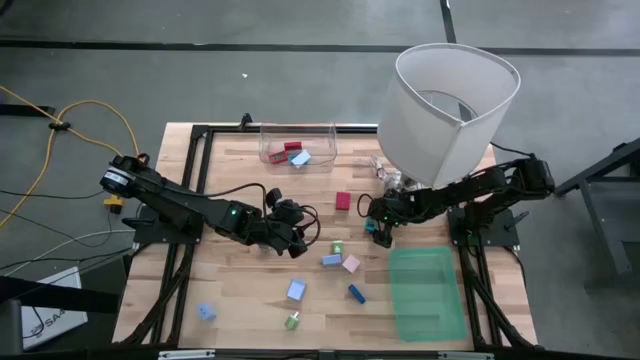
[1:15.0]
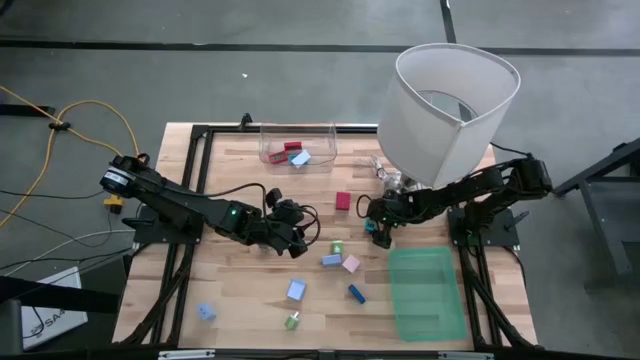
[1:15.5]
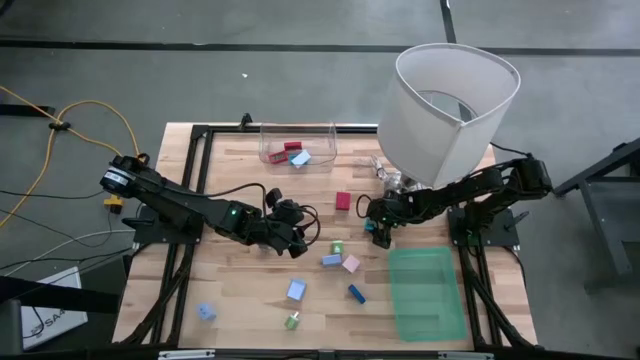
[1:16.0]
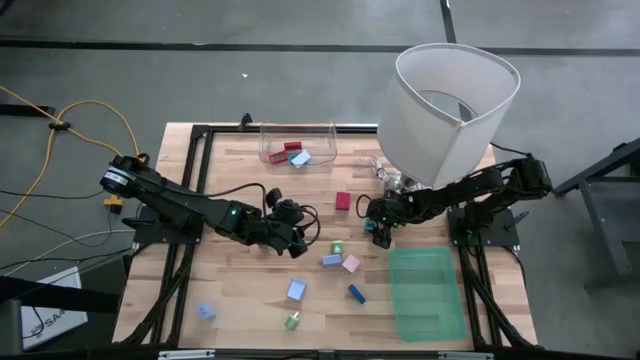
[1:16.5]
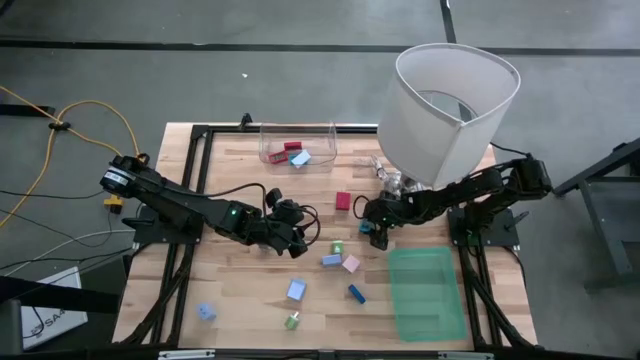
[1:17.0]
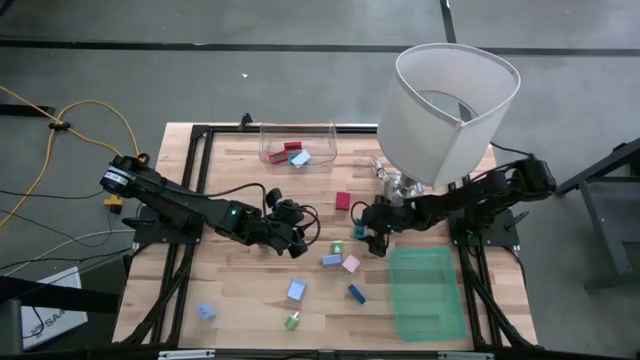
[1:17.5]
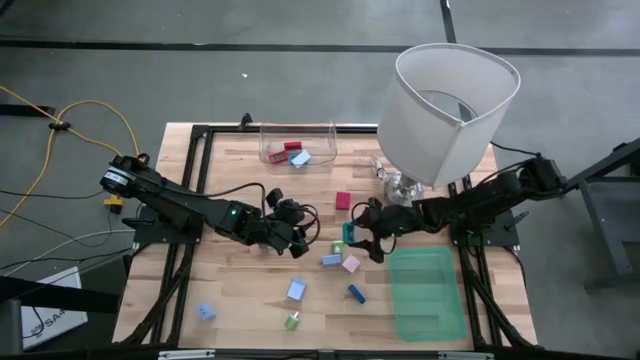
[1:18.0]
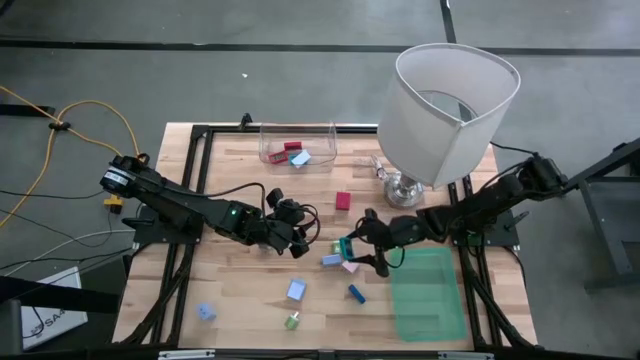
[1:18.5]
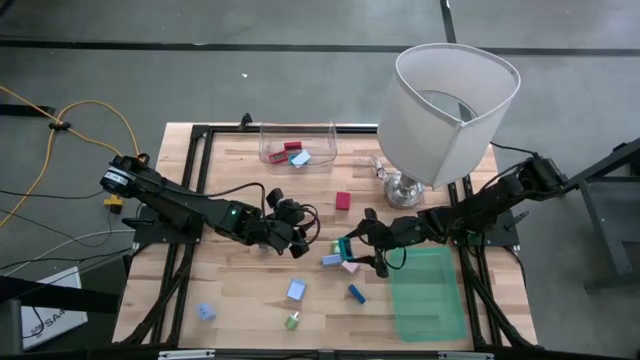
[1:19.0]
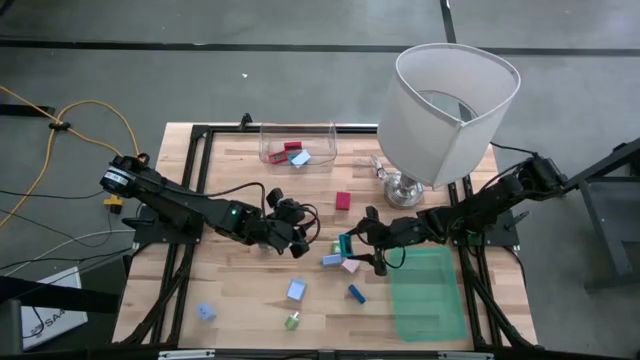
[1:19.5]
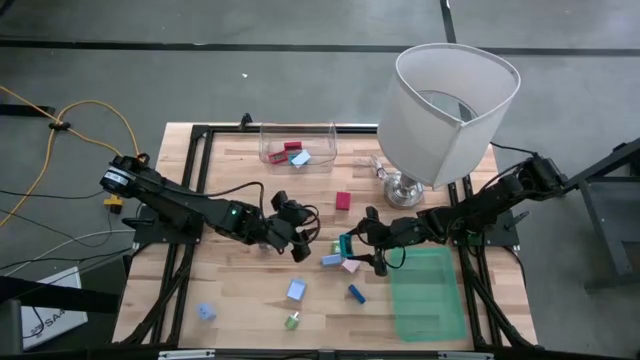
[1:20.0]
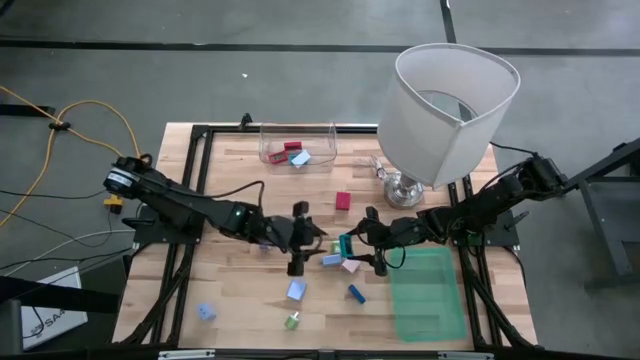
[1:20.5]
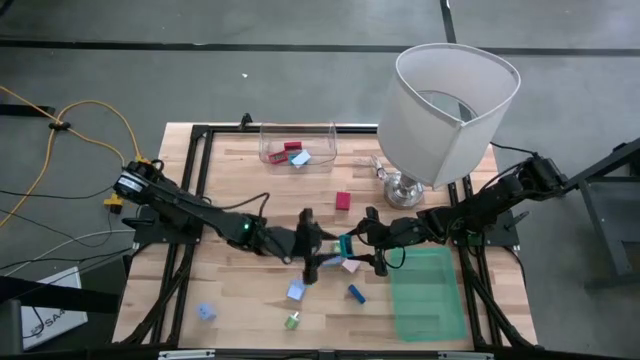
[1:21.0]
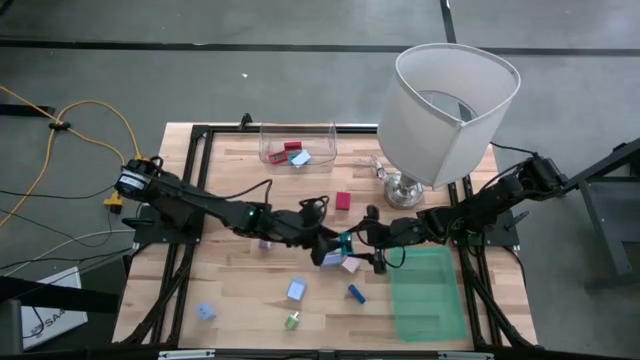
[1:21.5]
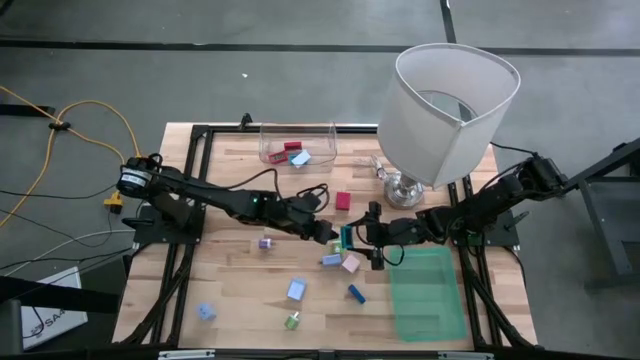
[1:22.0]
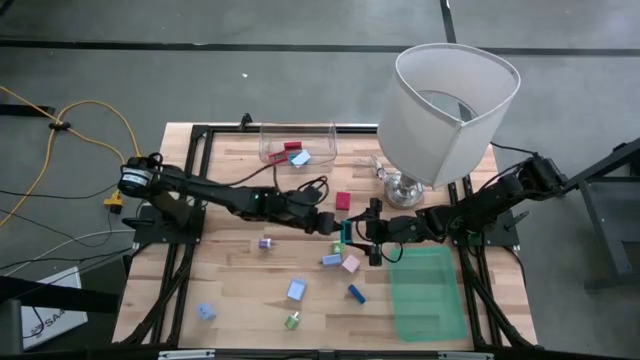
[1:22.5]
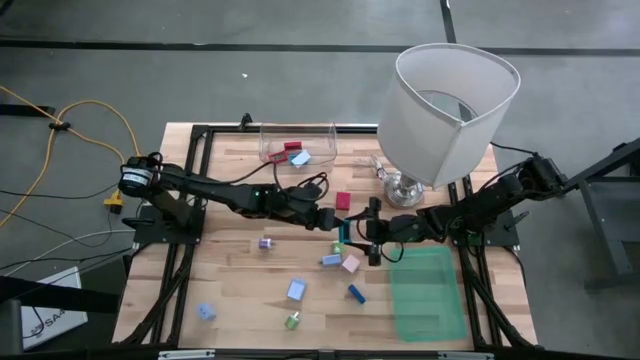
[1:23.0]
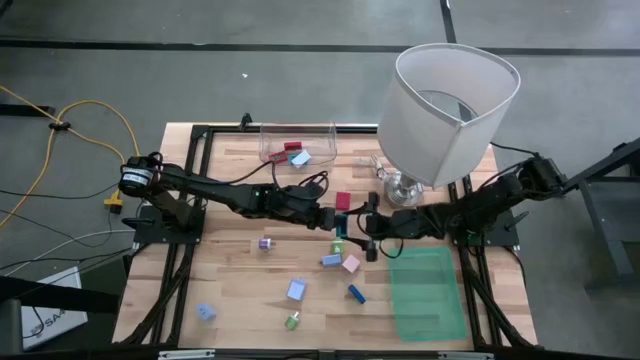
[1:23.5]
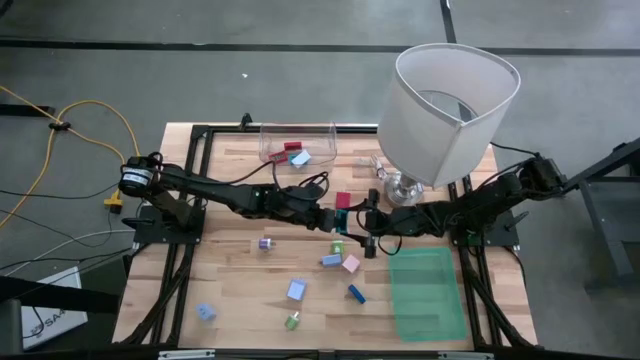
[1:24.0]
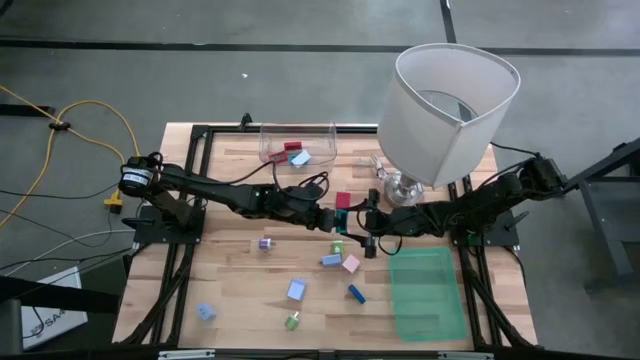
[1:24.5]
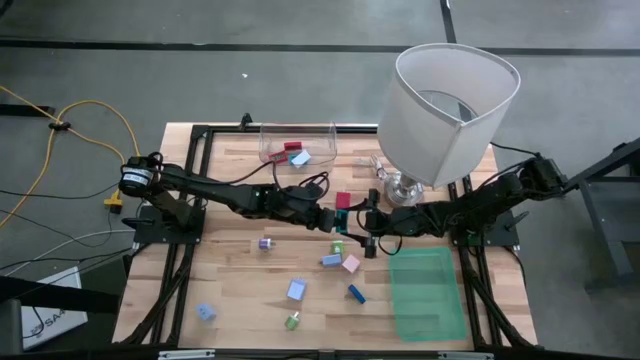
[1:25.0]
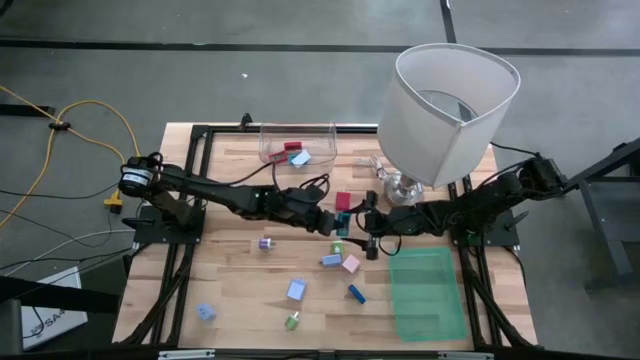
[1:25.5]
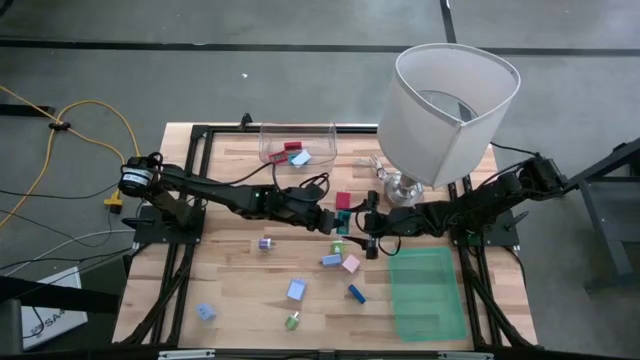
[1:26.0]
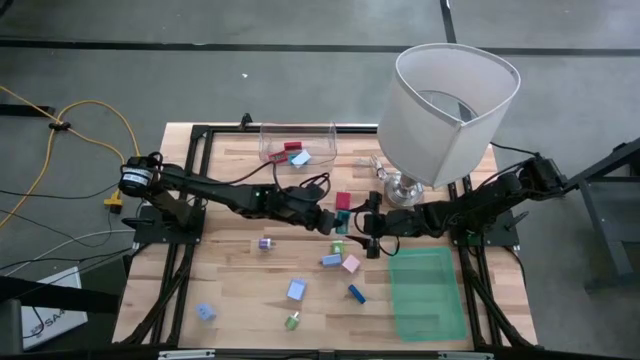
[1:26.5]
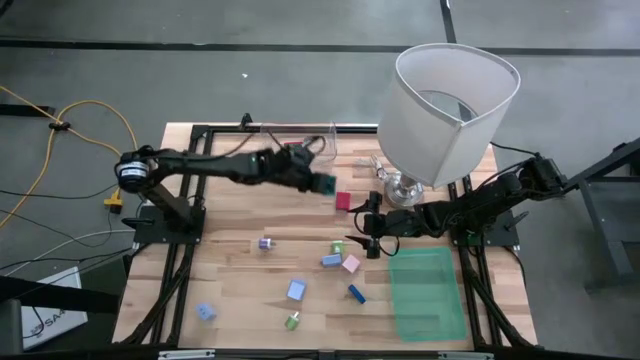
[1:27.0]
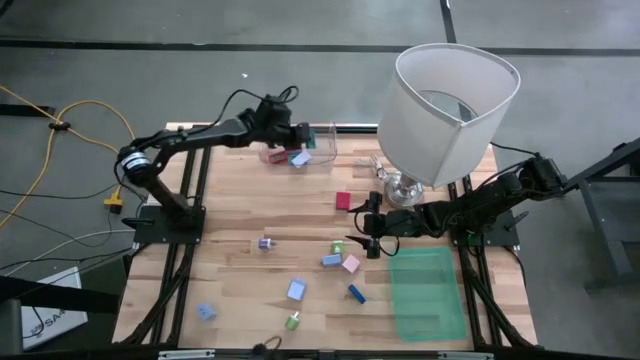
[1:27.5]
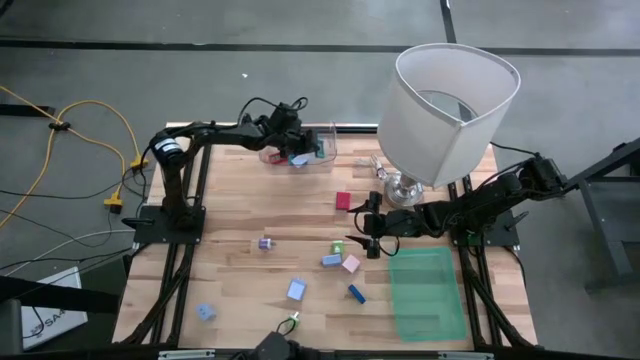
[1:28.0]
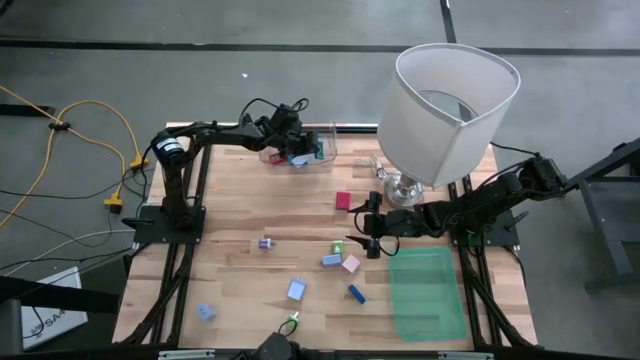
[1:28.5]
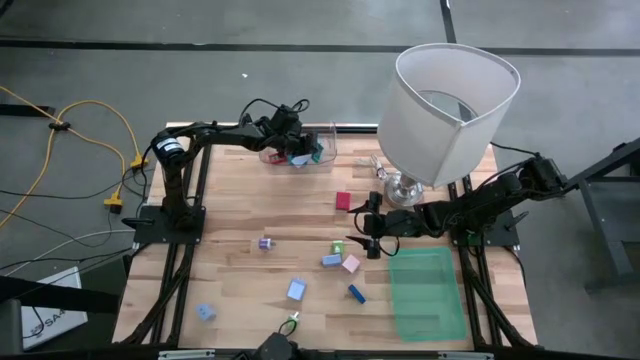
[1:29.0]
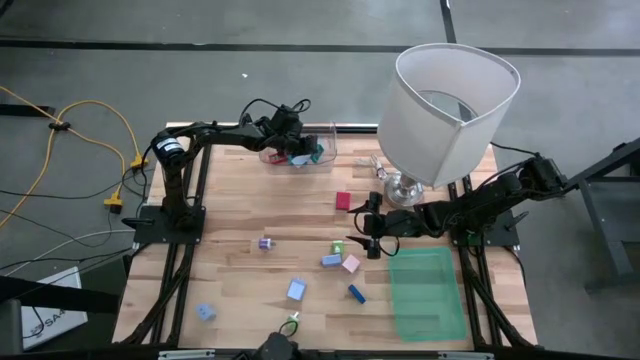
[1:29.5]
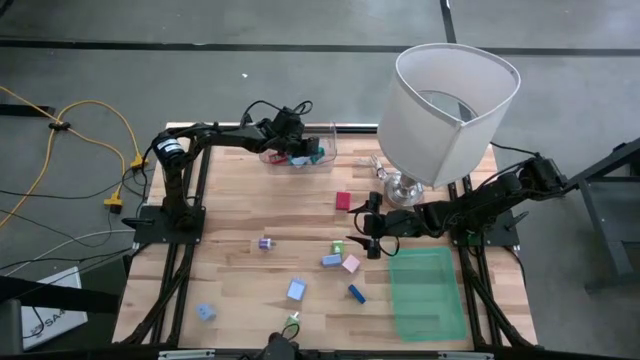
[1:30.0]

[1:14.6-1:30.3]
Task: Pick & Place Office items
Put the light blue digital clock into the transparent bin

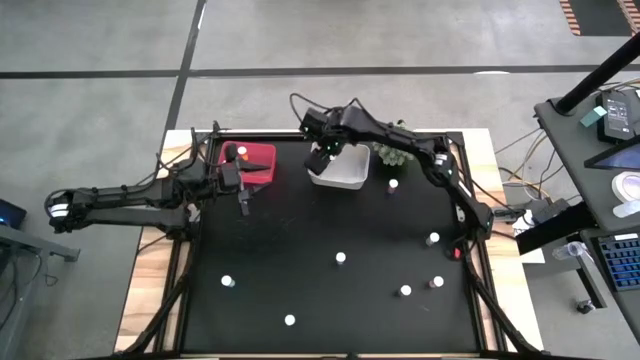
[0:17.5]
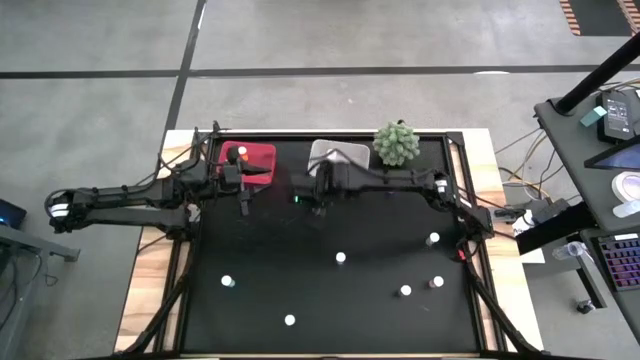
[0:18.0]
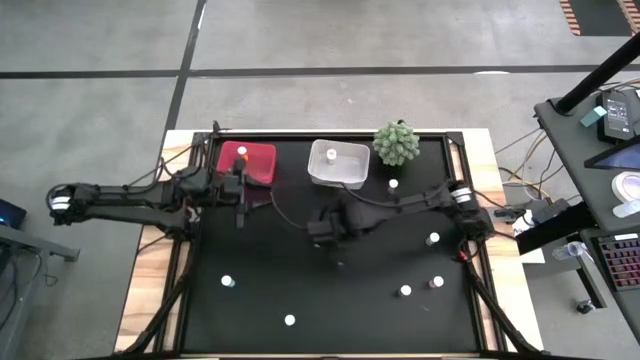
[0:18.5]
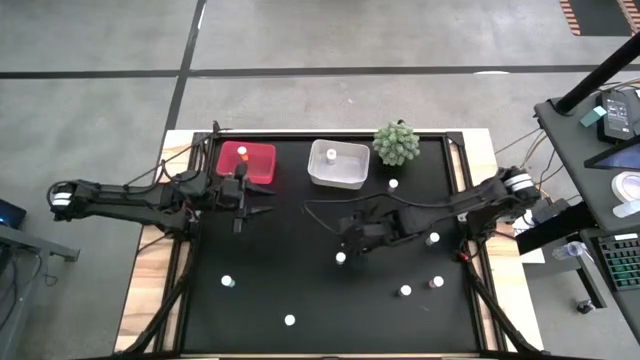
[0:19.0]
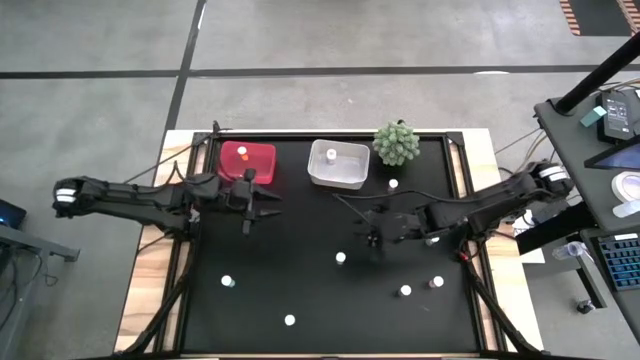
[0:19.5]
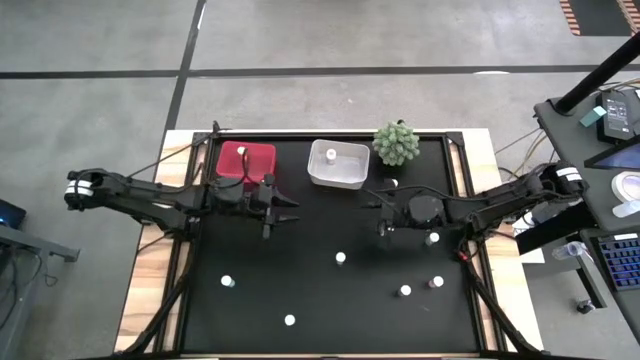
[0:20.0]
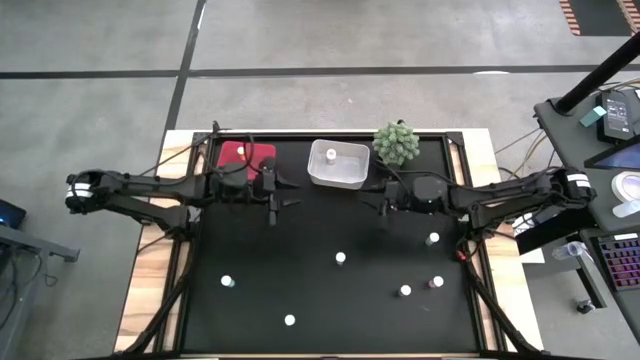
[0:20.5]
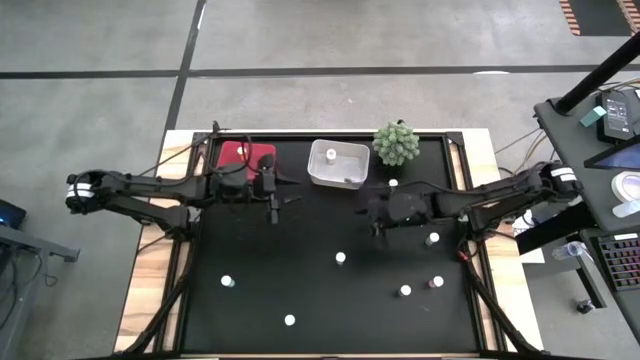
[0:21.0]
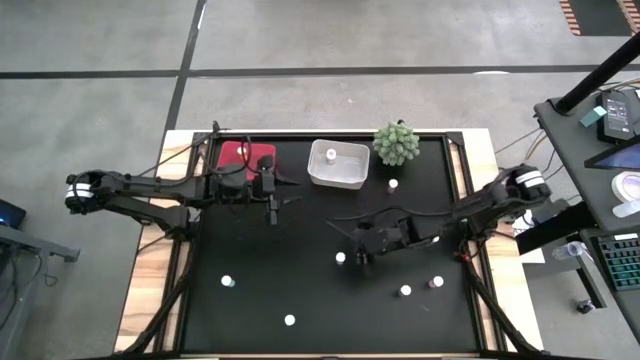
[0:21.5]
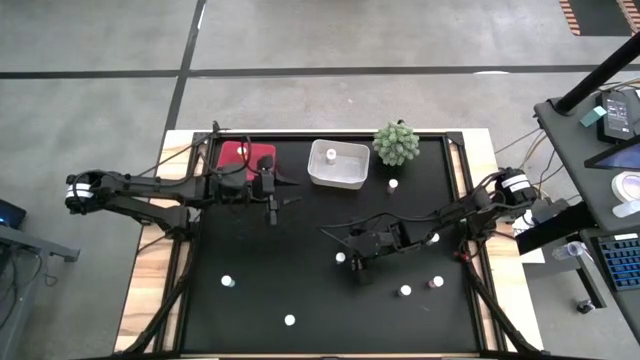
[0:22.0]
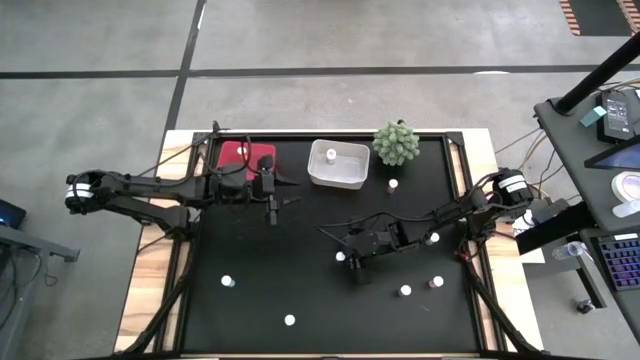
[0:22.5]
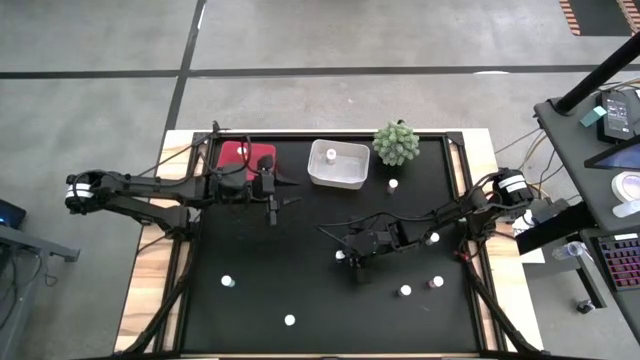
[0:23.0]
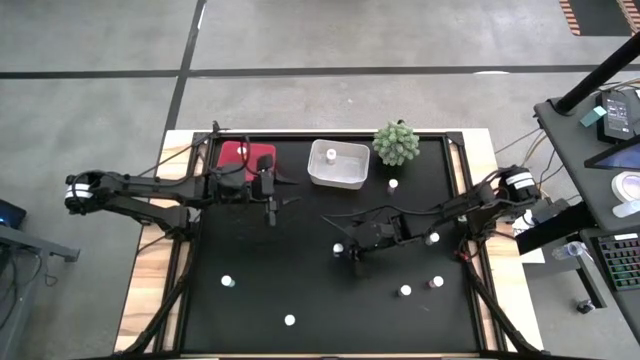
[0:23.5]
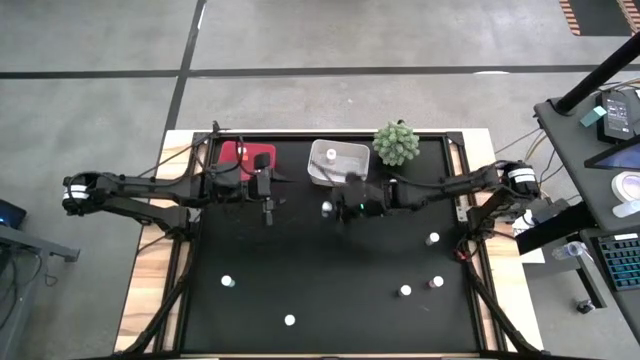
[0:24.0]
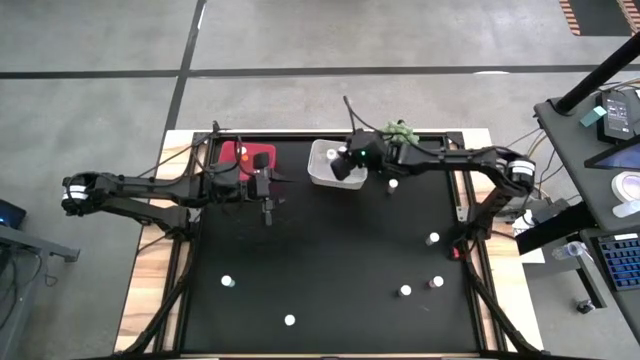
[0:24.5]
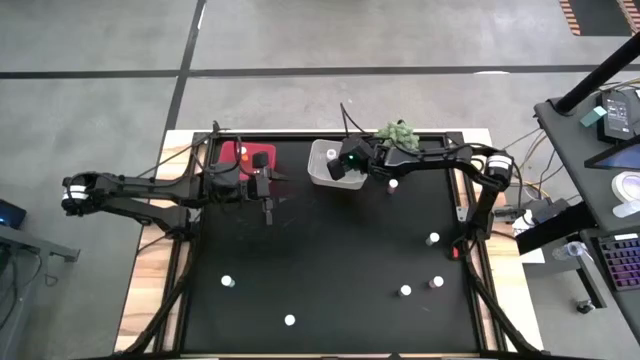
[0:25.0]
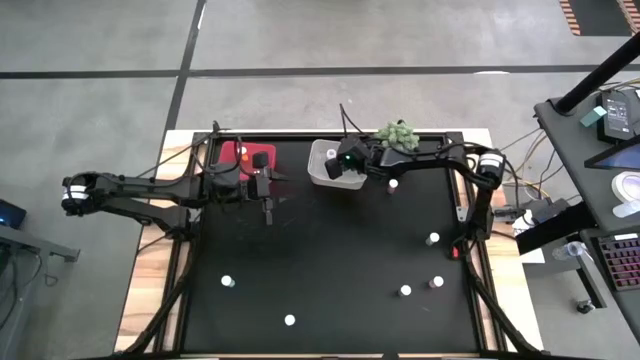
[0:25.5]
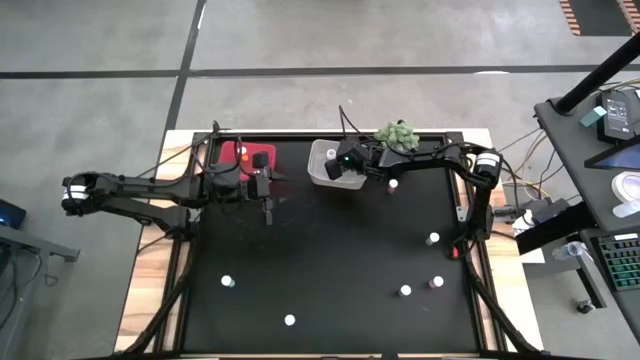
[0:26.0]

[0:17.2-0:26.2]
Task: Pick and place medicine bottles into bin by pill shape (circle, oval)
Put the blue capsule bottle into the white bin
